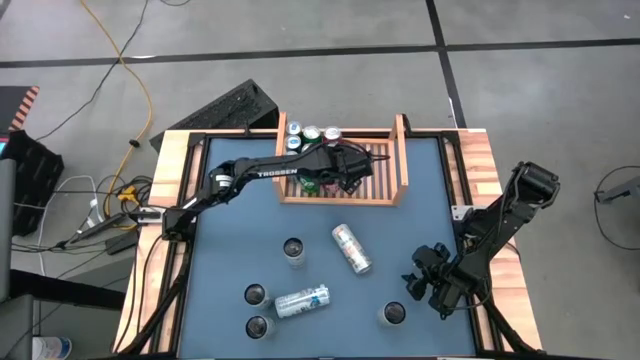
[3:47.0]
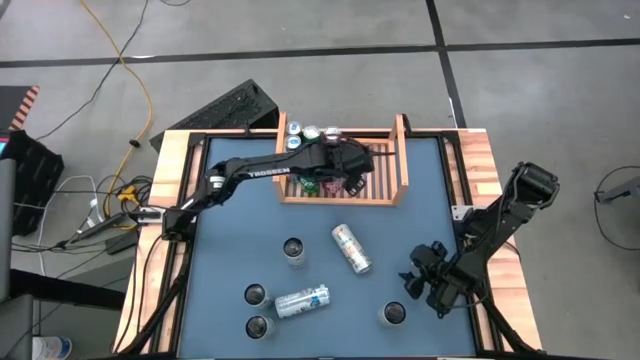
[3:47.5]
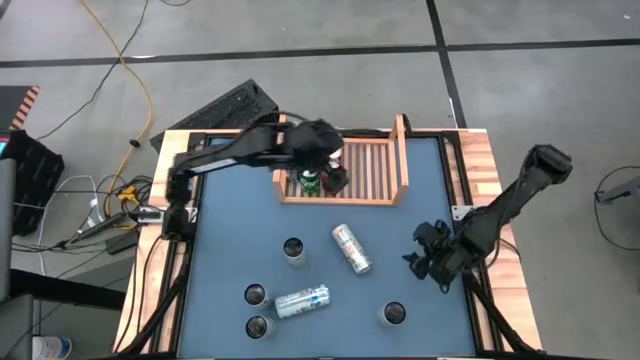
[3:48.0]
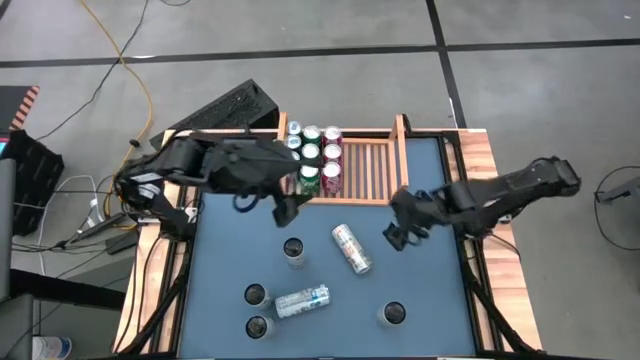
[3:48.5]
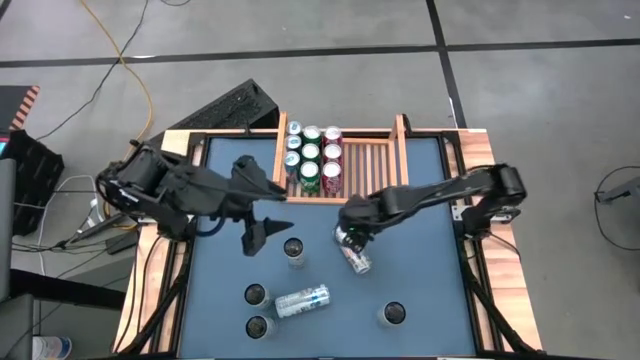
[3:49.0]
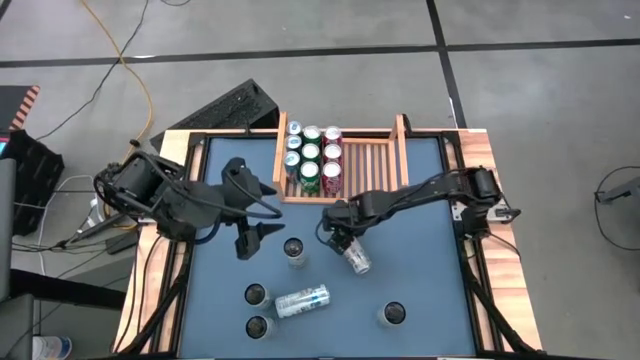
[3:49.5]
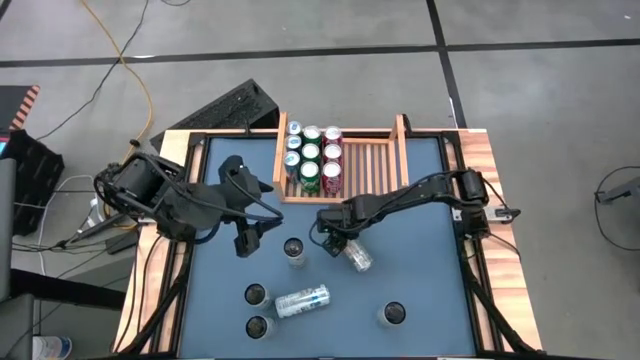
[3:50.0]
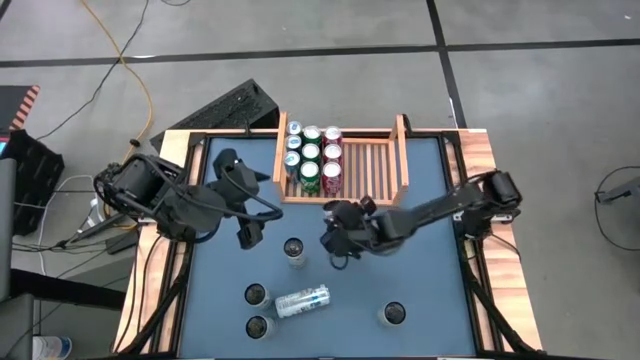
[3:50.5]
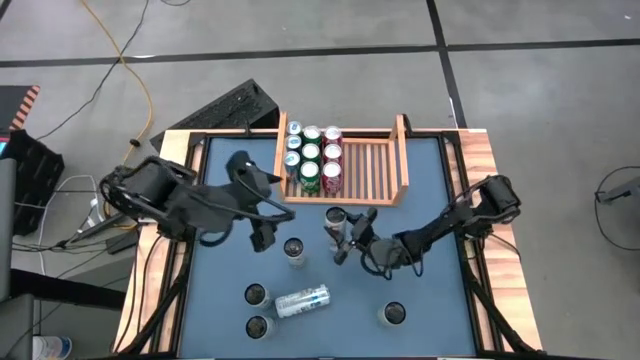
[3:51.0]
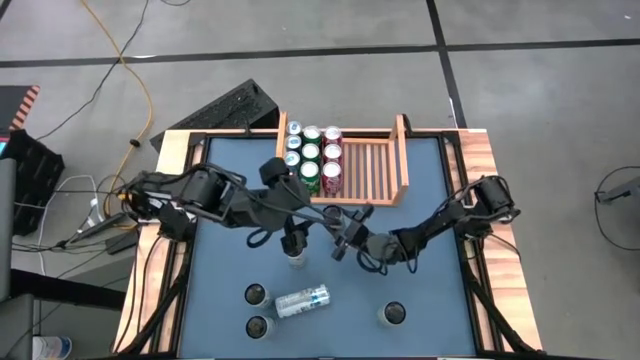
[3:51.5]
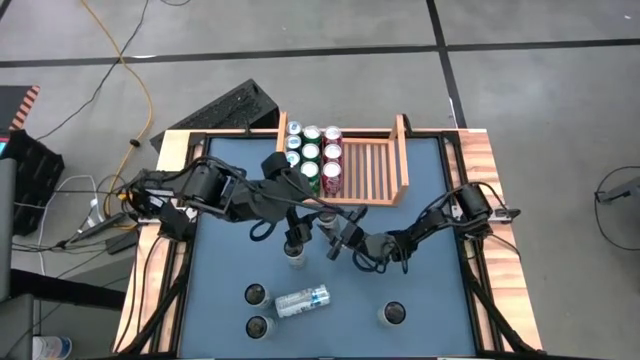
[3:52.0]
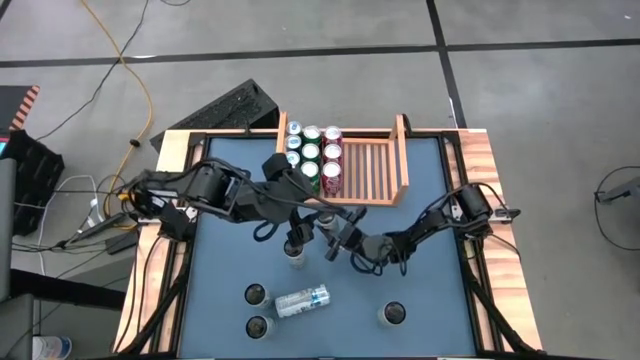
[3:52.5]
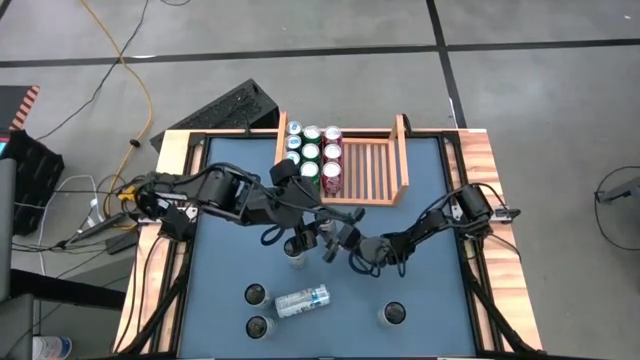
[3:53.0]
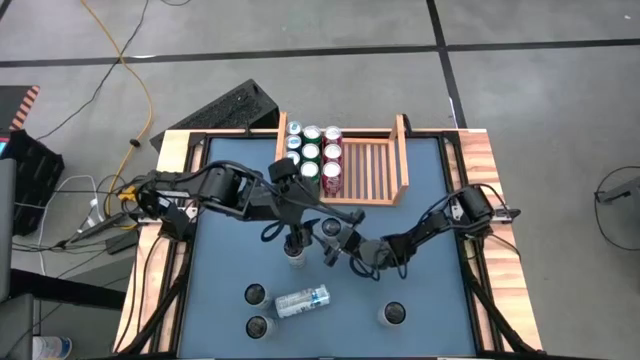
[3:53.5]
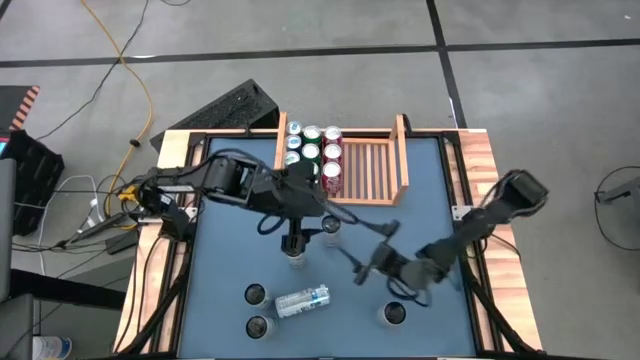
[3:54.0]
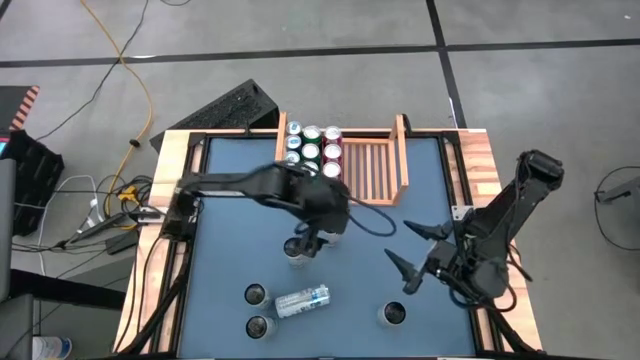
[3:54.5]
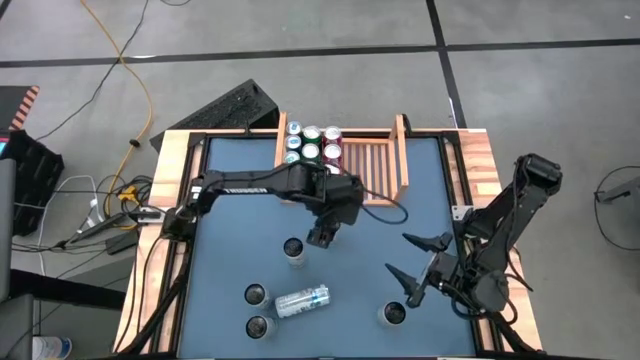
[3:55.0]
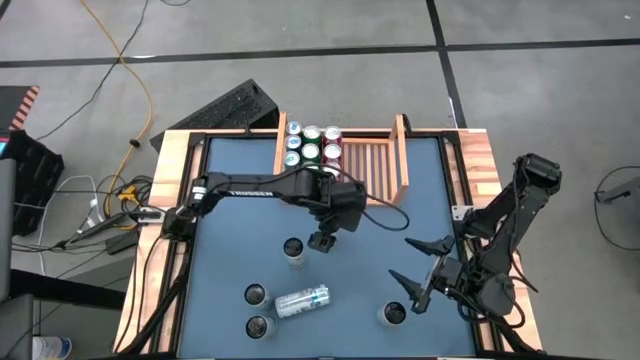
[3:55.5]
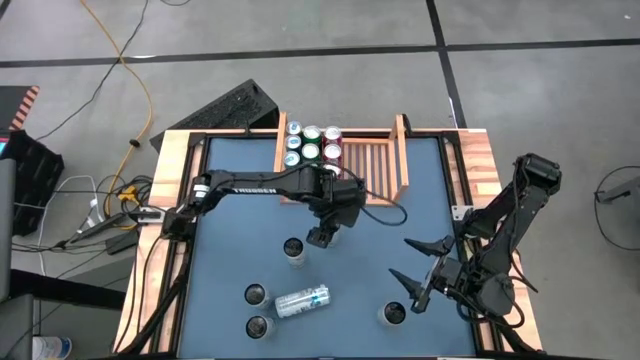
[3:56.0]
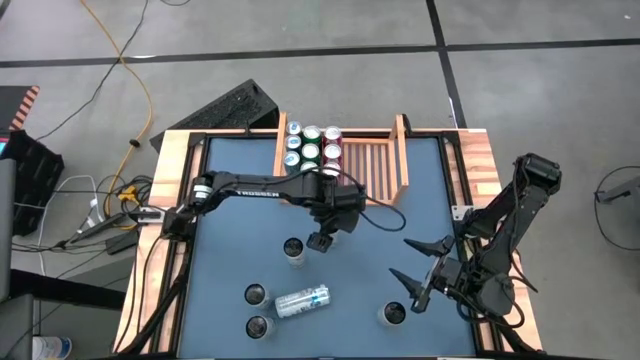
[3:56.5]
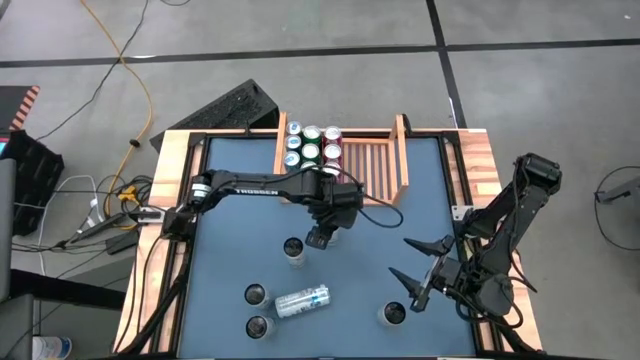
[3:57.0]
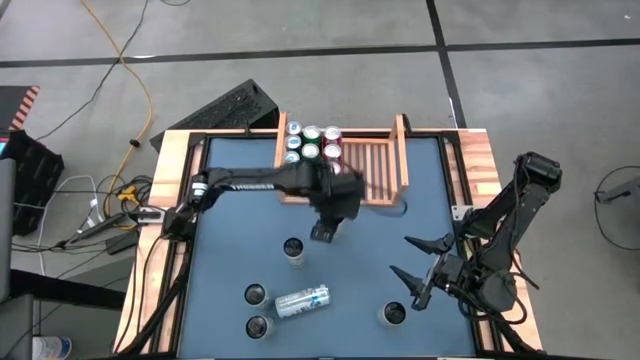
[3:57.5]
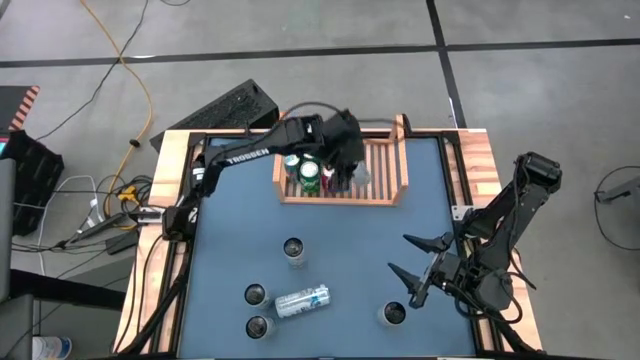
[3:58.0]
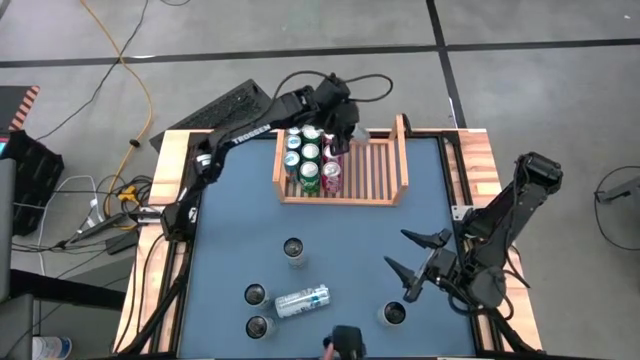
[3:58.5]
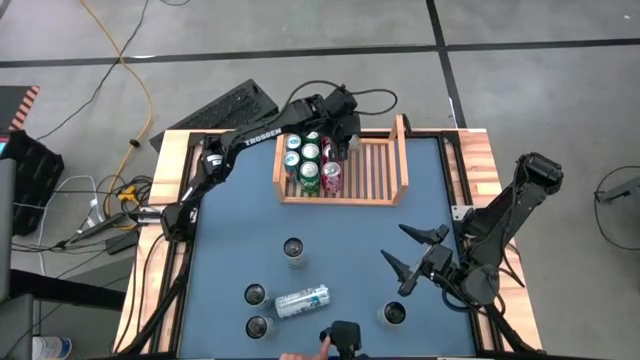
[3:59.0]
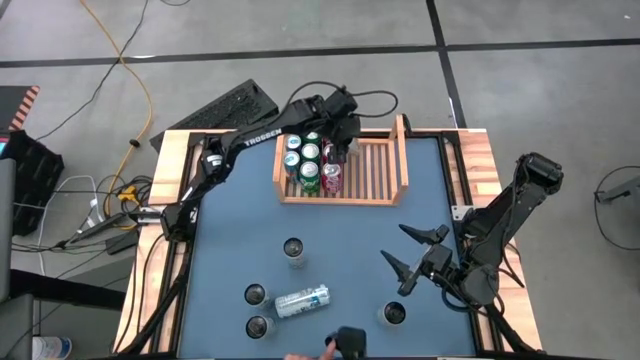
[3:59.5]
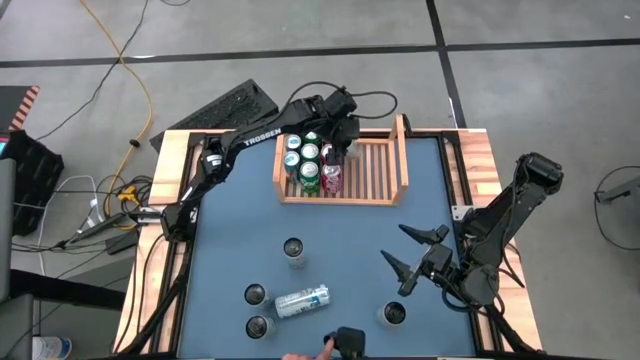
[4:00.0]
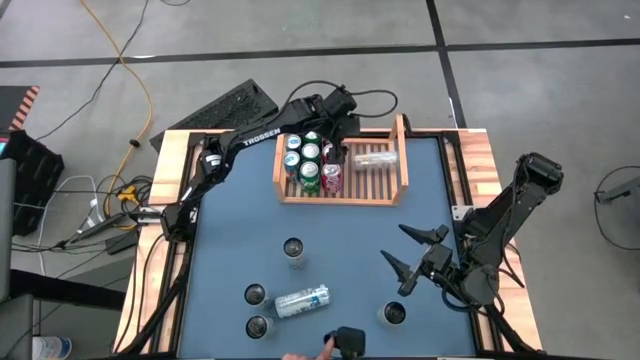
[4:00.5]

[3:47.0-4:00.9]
Task: Place canned beverage on shelf
Put the light yellow soda can on the shelf

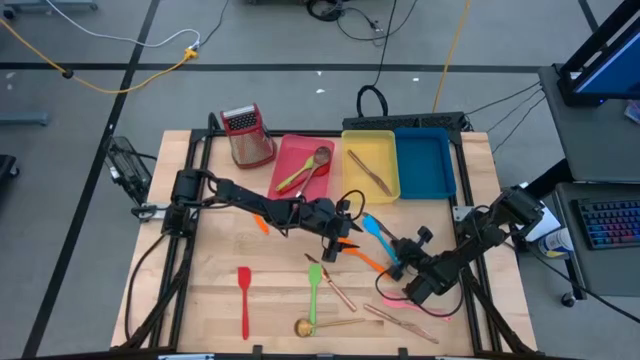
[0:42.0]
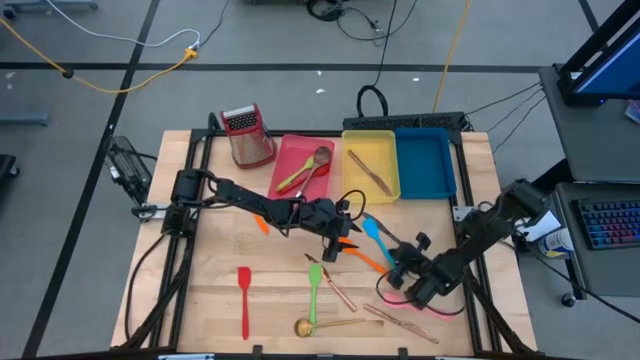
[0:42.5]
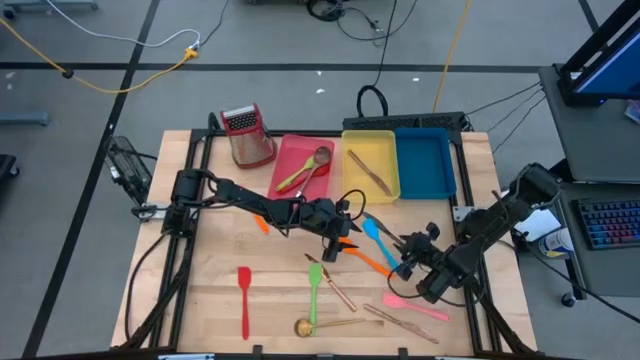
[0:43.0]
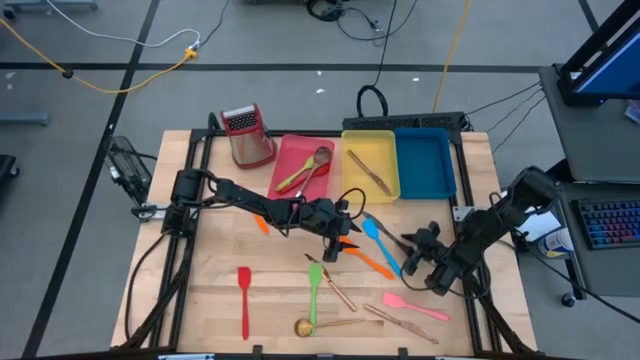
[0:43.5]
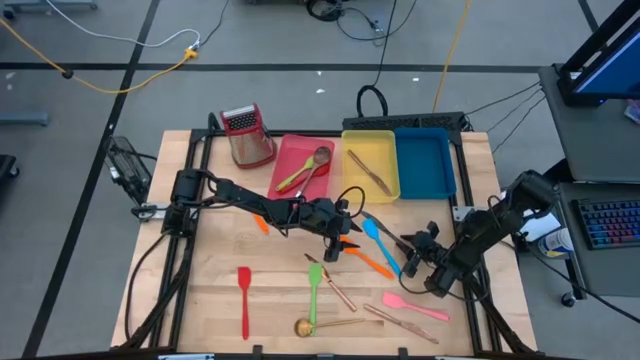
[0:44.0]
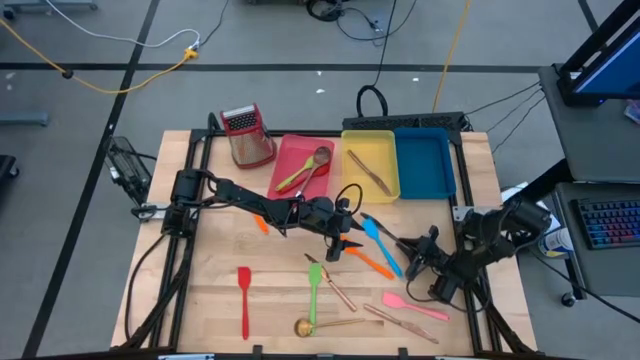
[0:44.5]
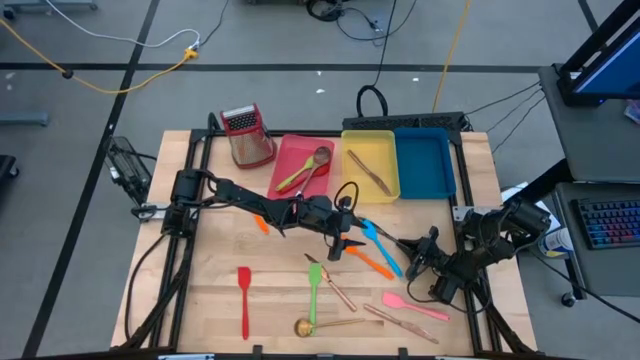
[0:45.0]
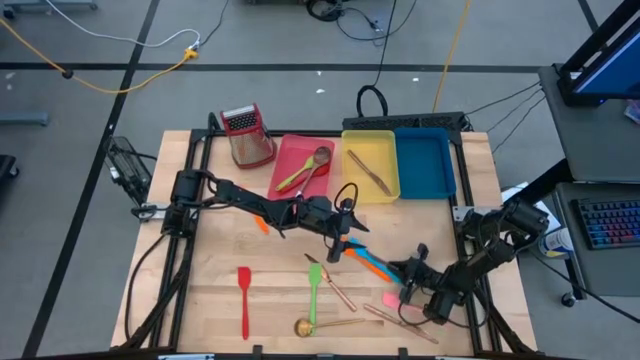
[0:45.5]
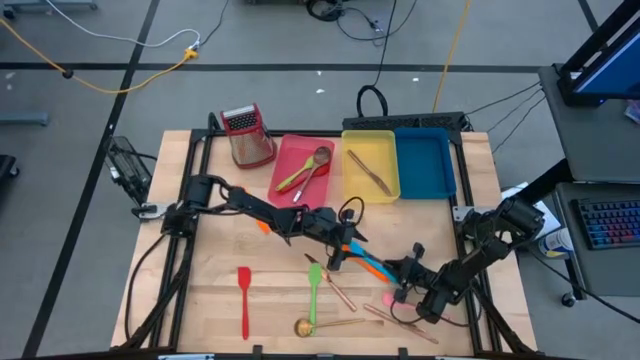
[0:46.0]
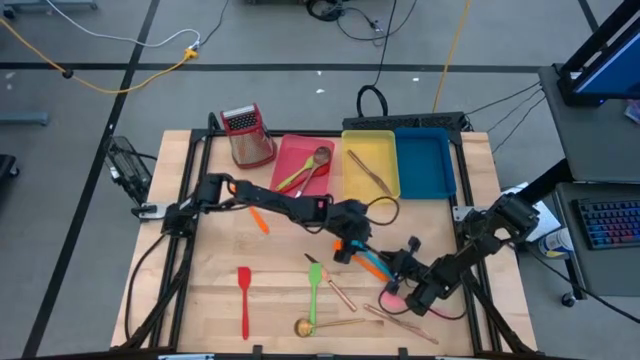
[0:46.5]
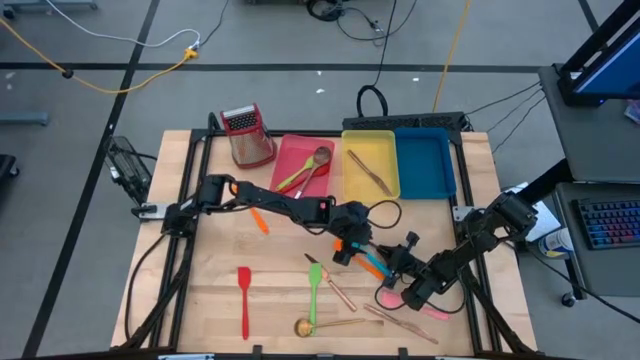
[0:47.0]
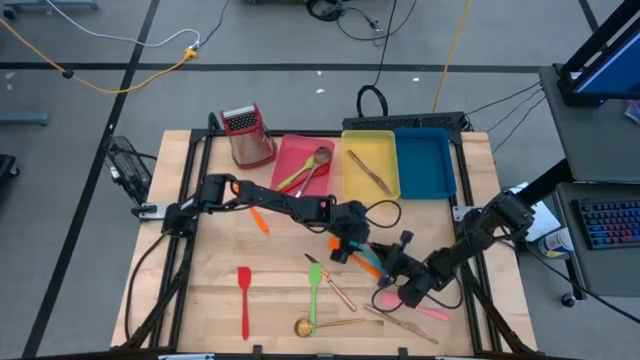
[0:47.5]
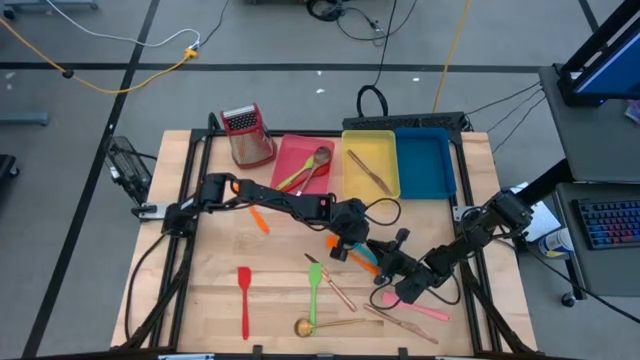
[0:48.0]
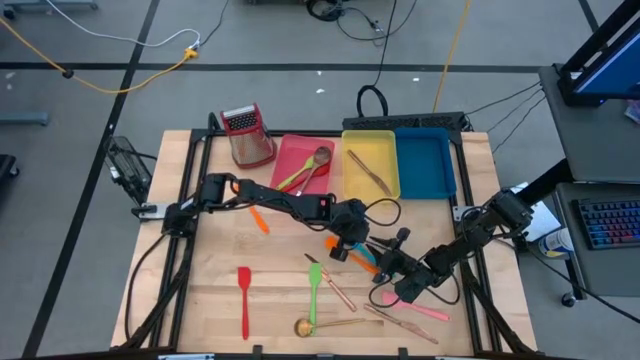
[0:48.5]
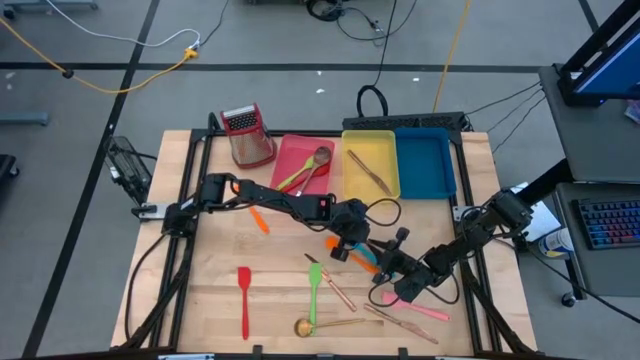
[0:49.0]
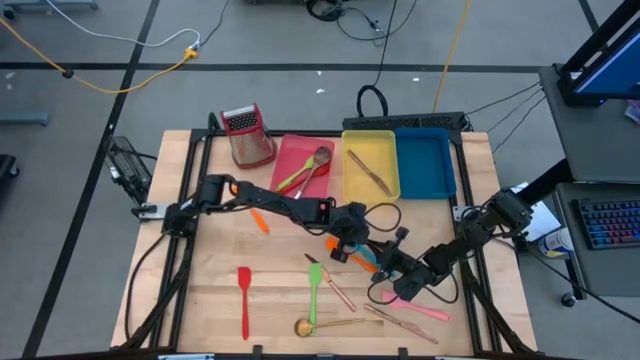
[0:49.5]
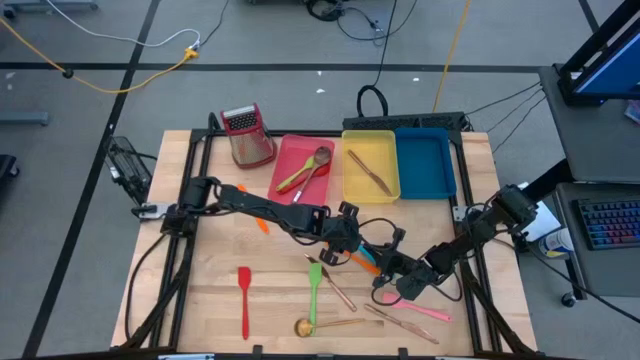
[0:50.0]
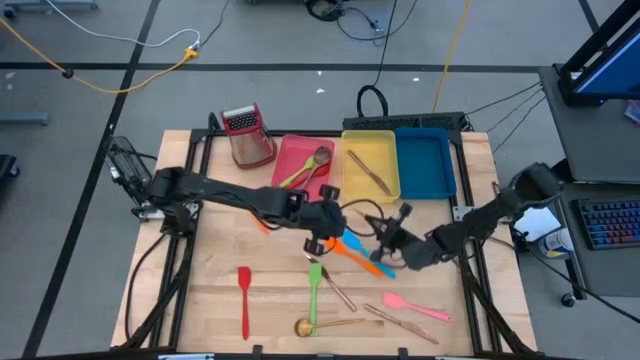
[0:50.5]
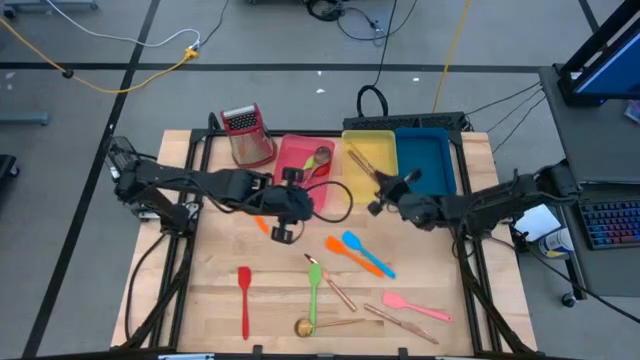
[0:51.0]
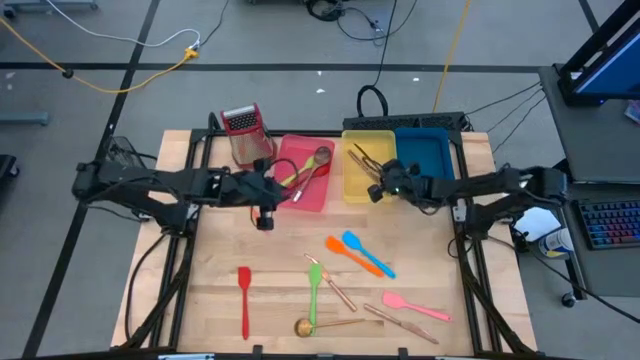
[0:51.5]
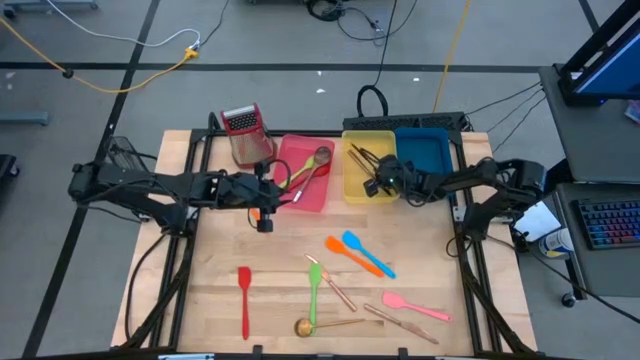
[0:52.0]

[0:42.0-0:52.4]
Task: Pick & Place Kitchen Items
Put the black table knife into the yellow bin
